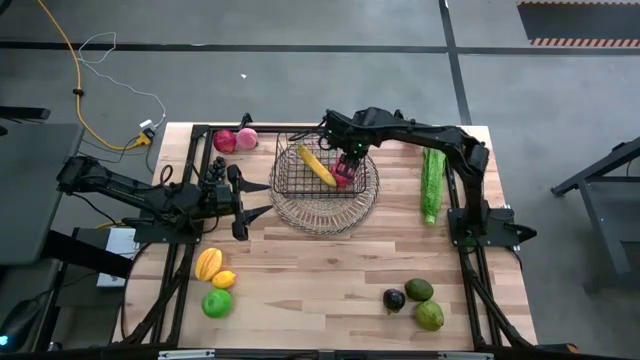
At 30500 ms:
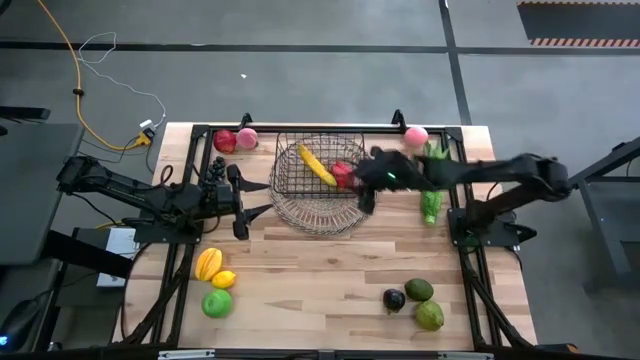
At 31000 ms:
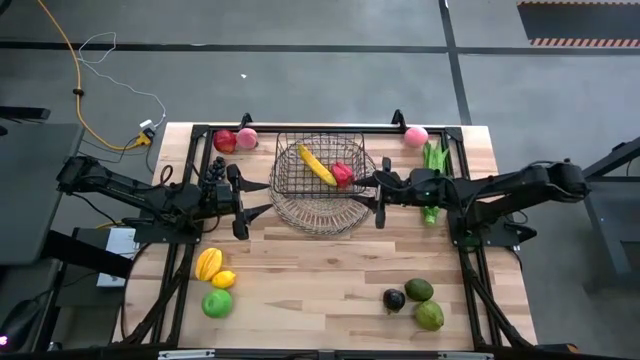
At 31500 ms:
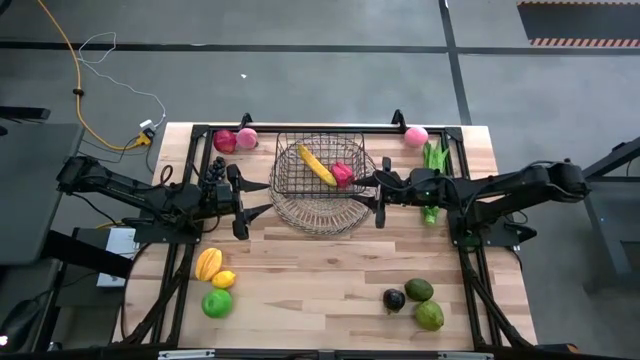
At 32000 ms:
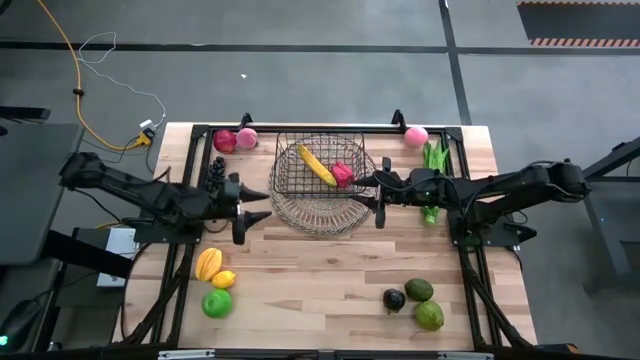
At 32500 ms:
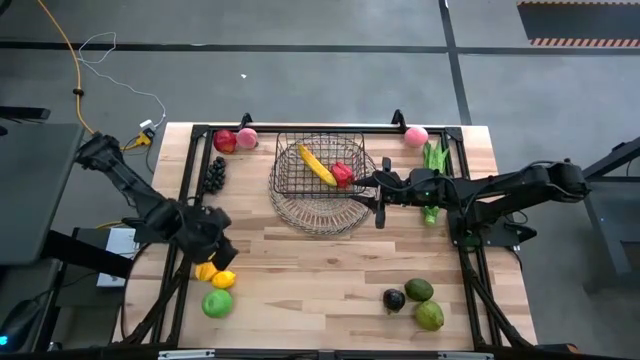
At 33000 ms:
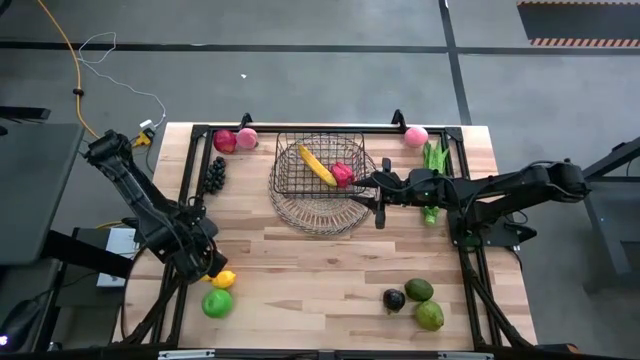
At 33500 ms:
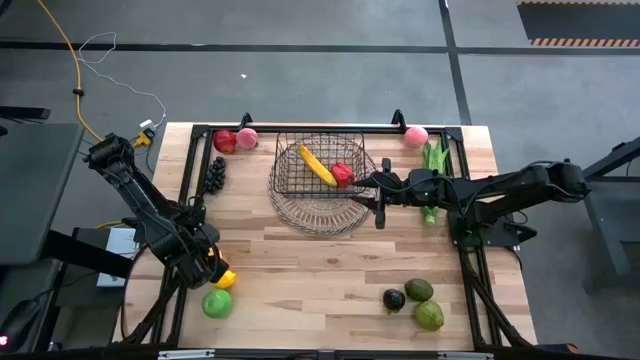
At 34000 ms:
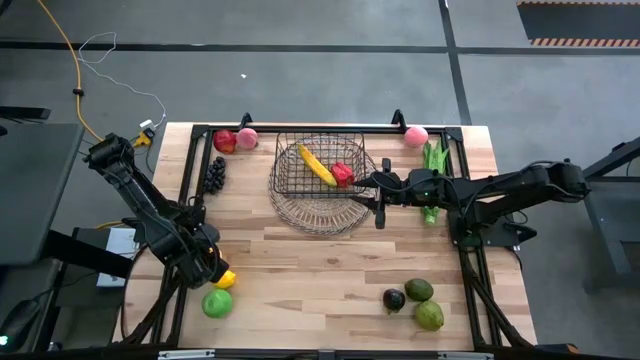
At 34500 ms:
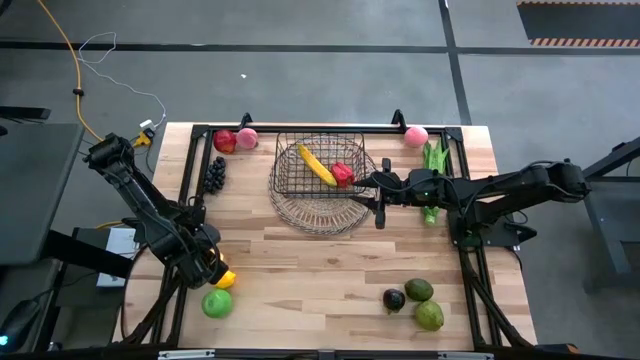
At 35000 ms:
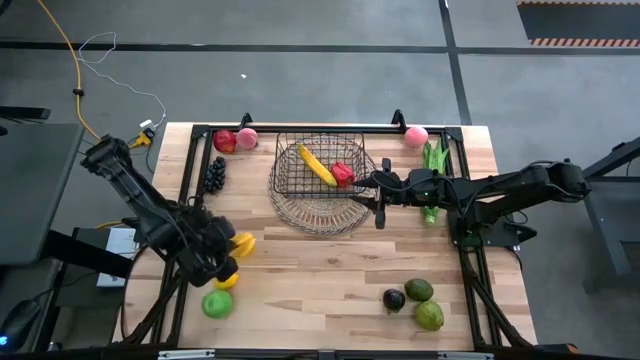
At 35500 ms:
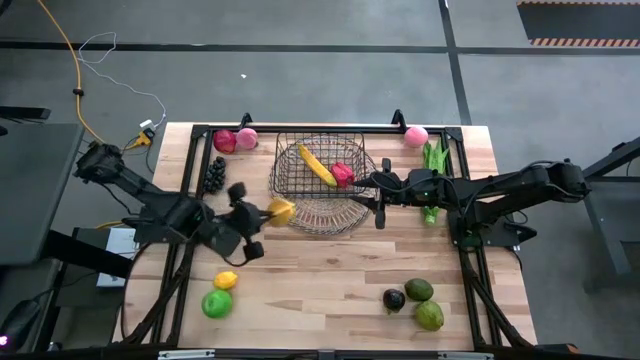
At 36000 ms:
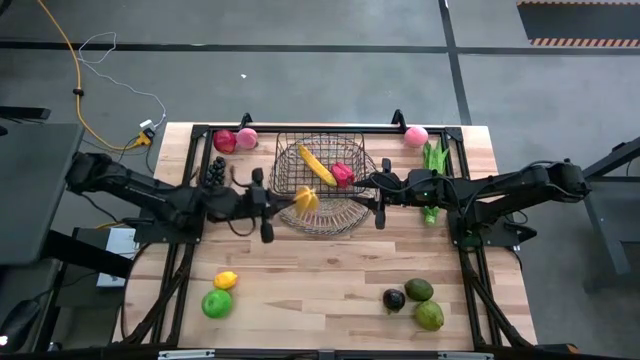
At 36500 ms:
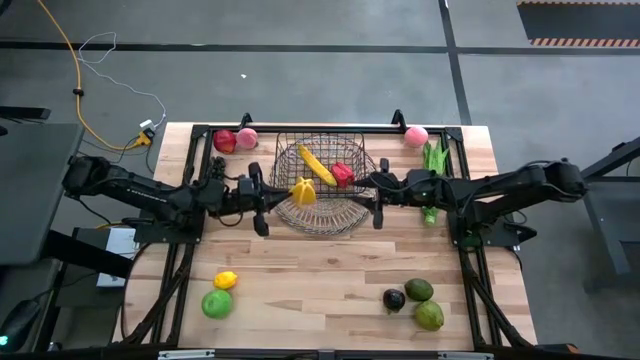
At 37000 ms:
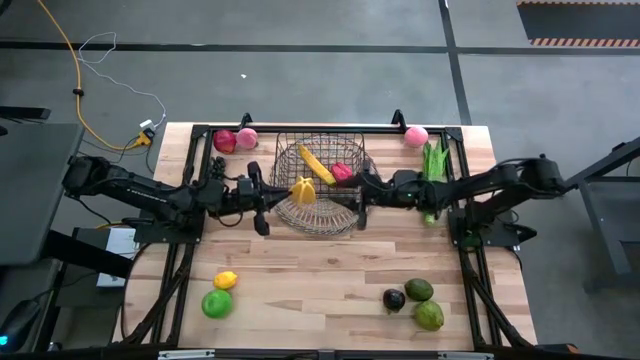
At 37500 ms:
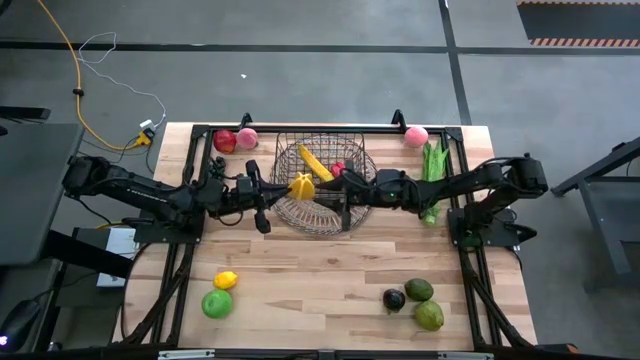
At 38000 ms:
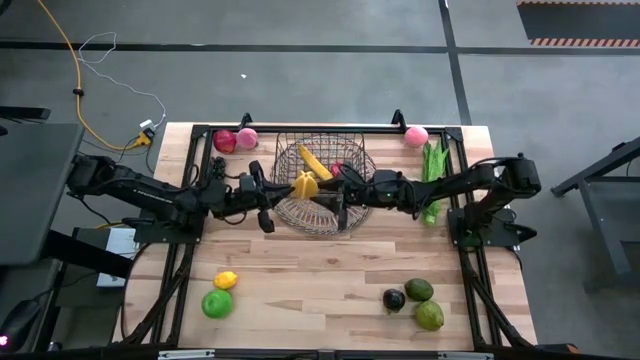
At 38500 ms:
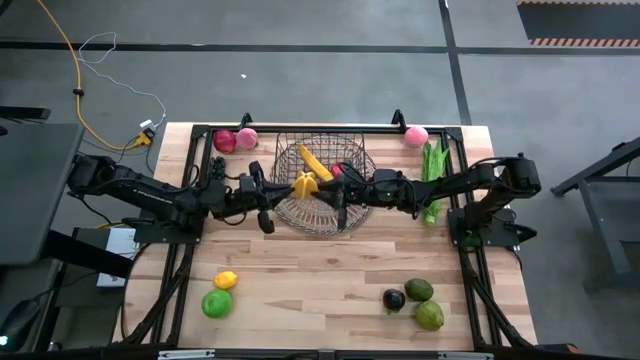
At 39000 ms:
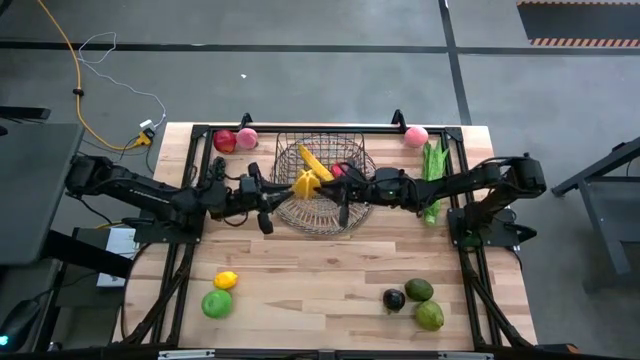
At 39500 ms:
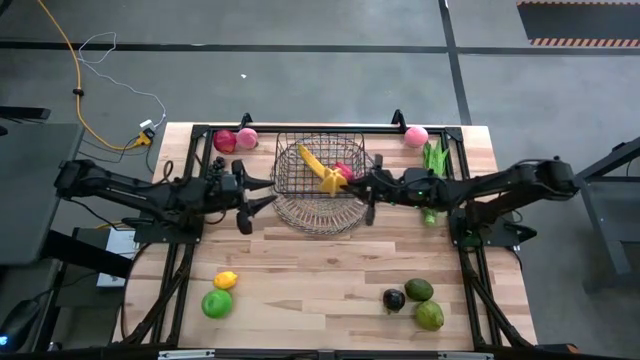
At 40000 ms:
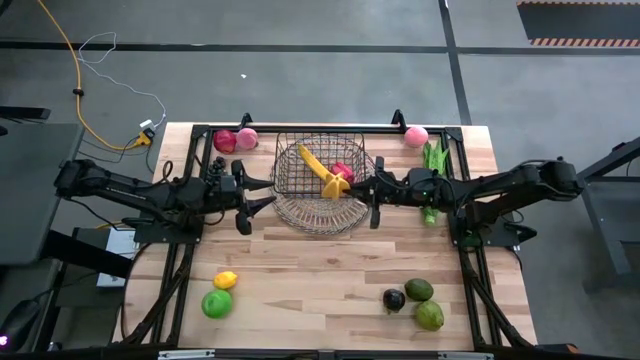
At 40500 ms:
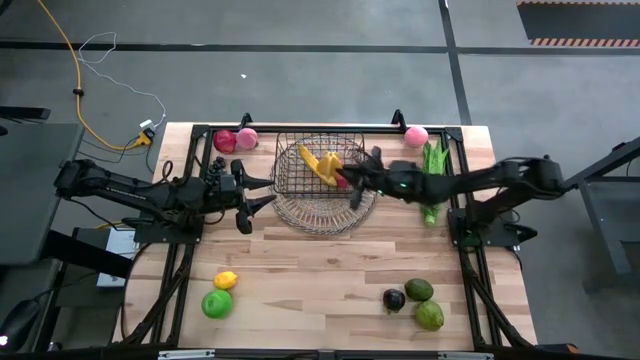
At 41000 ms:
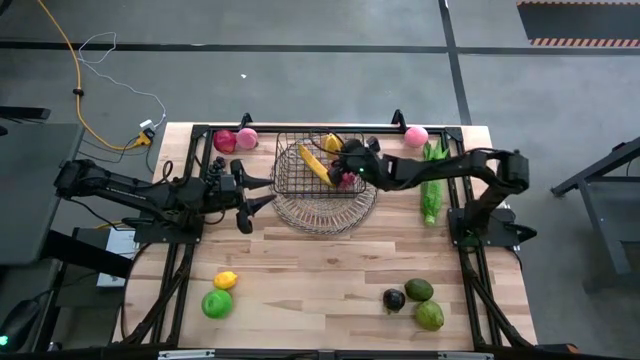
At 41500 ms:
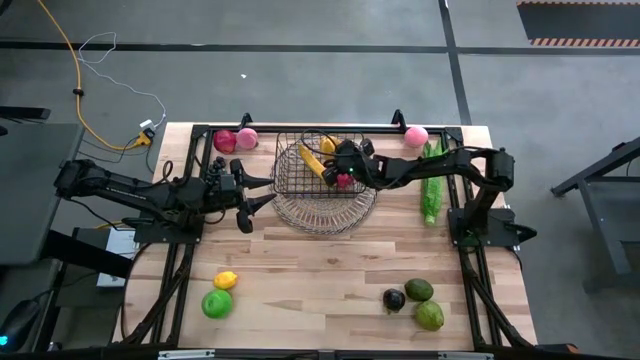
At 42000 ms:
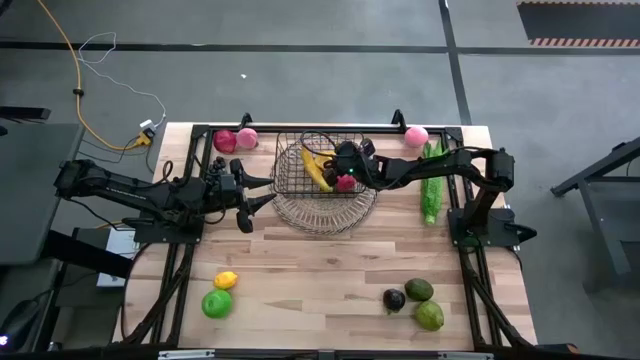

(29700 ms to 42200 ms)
Task: Build produce basket
Put the star fruit into the wire basket

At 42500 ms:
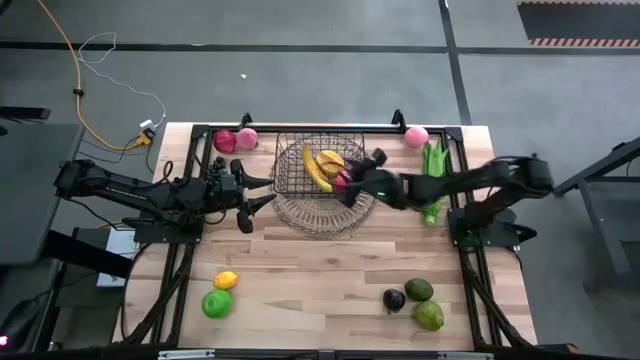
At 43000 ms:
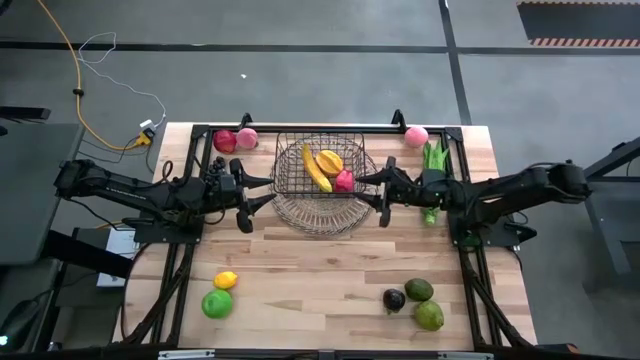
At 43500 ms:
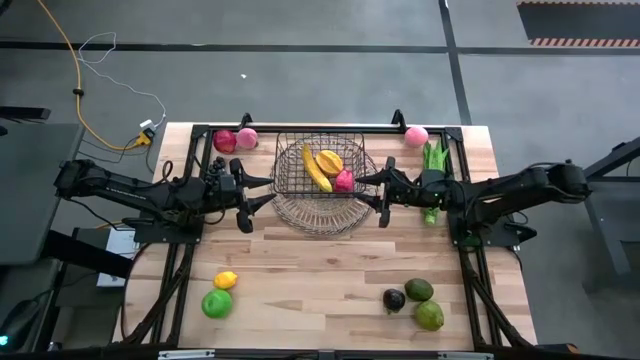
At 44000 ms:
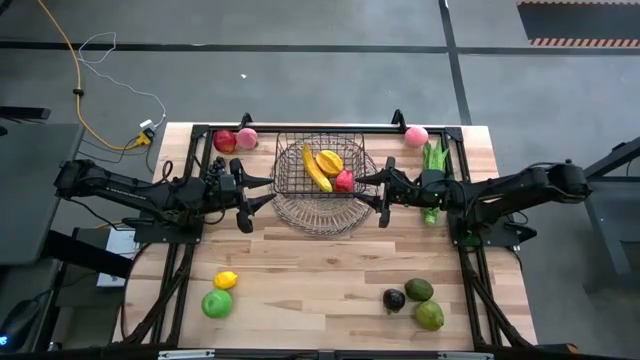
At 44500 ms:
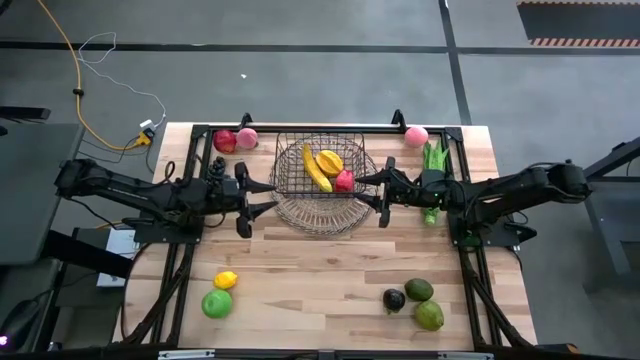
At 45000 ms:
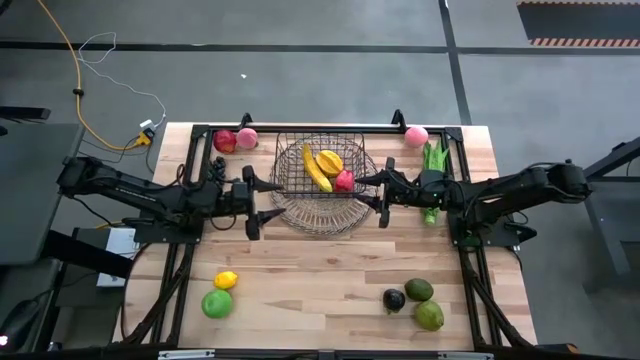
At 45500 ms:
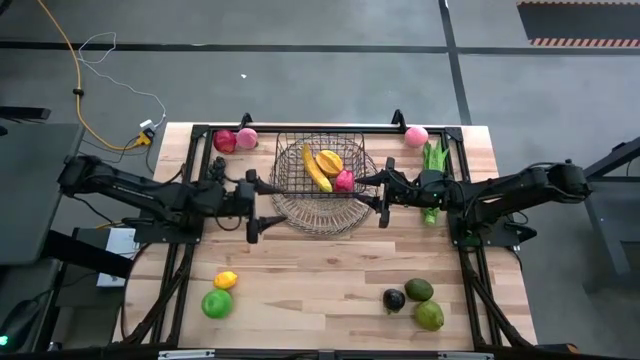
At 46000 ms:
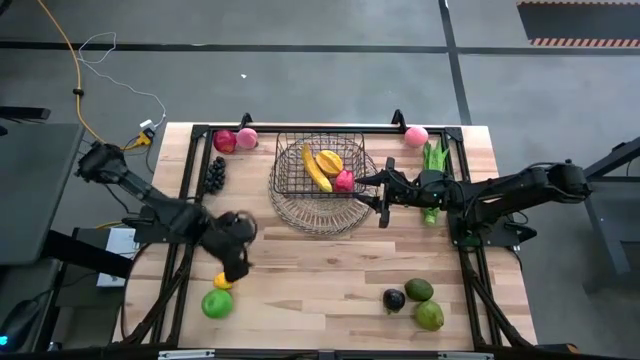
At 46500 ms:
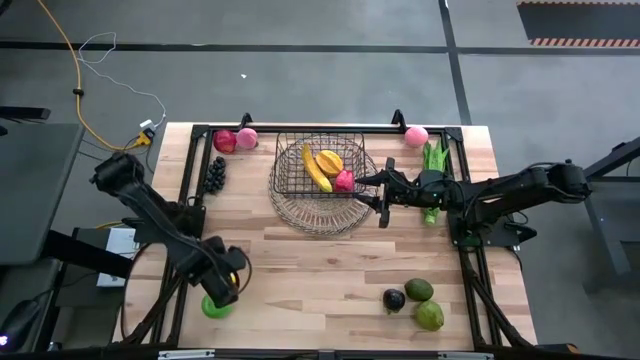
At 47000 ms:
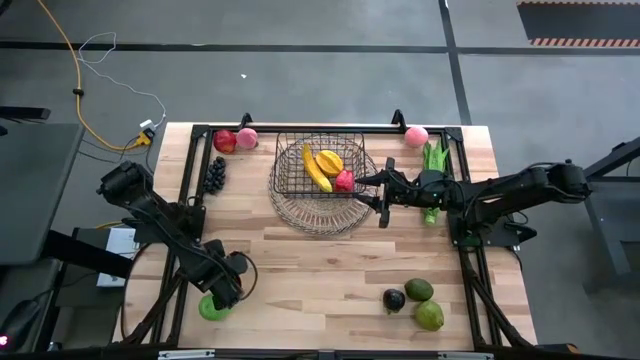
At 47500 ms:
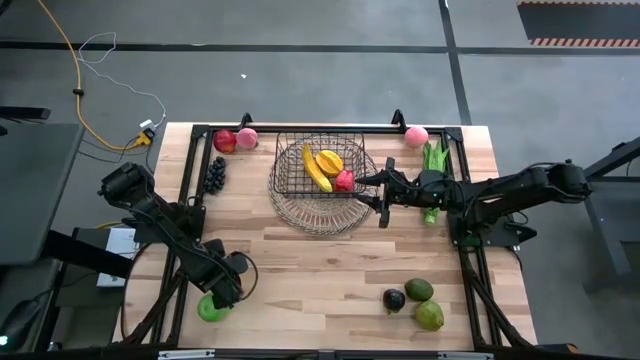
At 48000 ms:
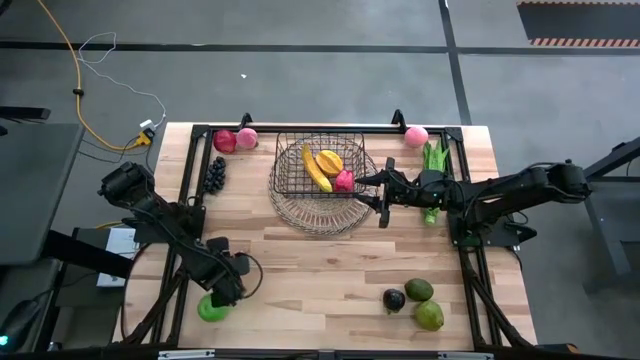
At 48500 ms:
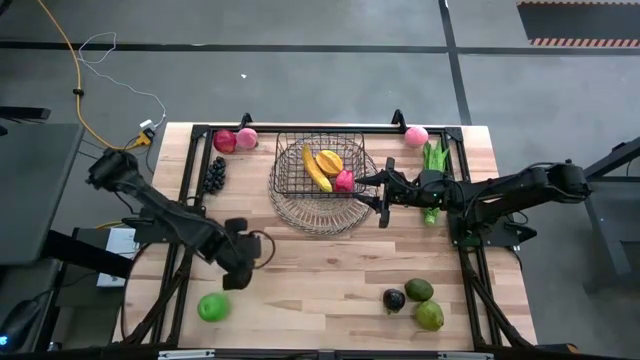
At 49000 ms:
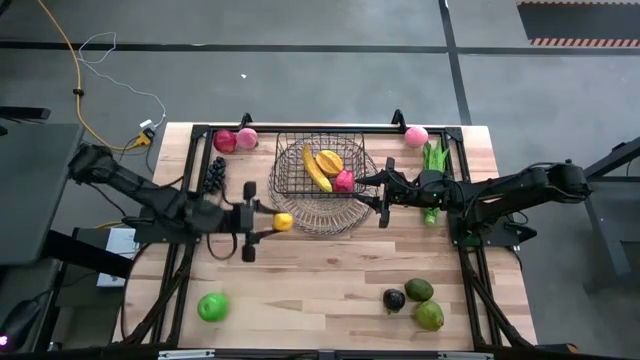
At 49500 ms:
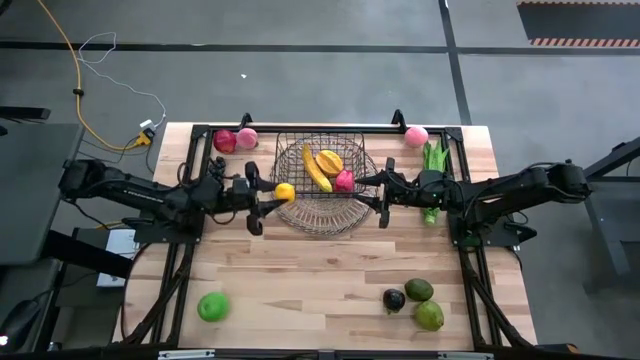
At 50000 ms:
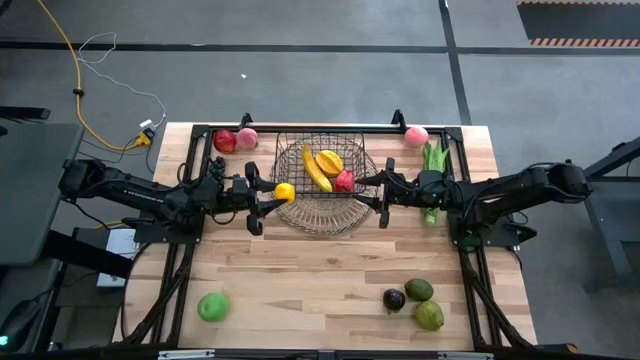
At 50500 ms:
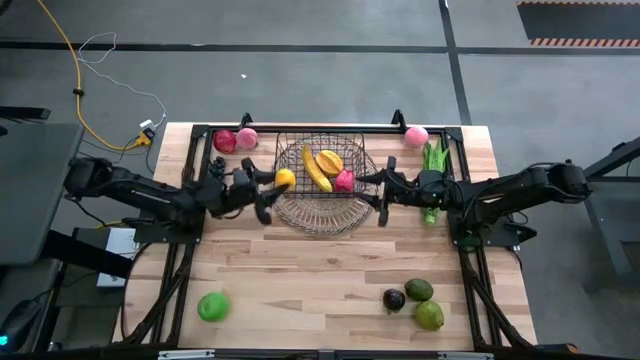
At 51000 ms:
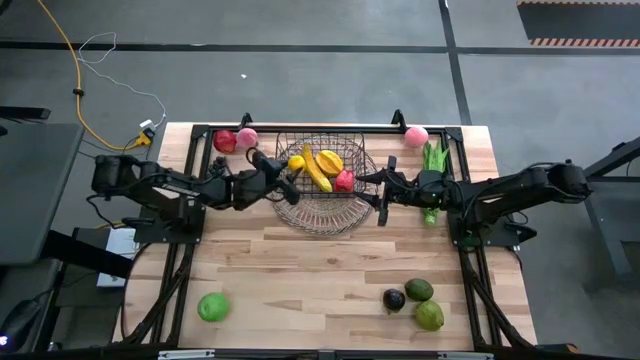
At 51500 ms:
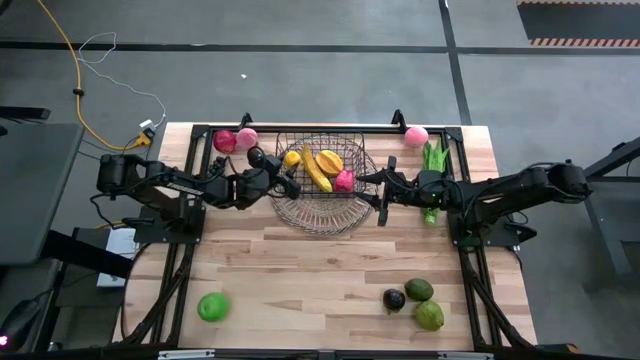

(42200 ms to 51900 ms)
Put the lemon into the wire basket
